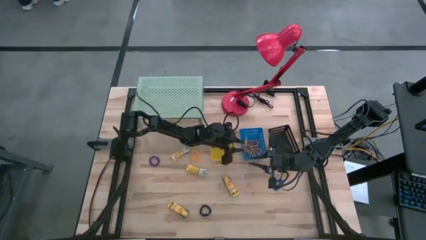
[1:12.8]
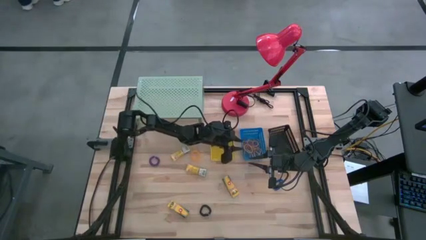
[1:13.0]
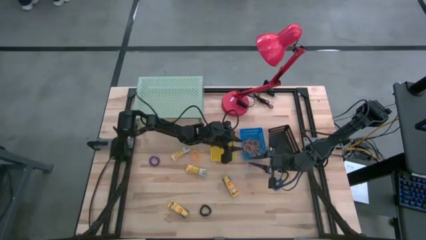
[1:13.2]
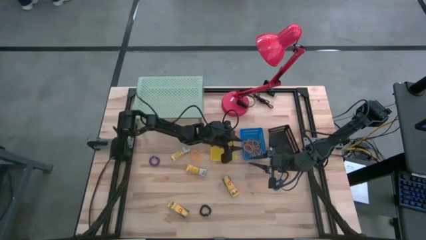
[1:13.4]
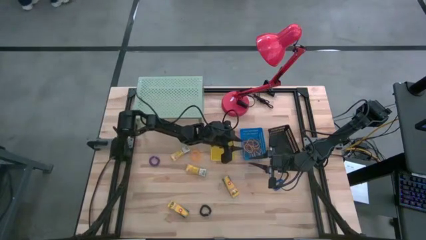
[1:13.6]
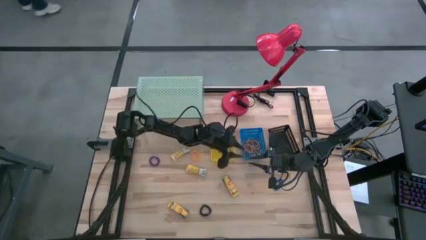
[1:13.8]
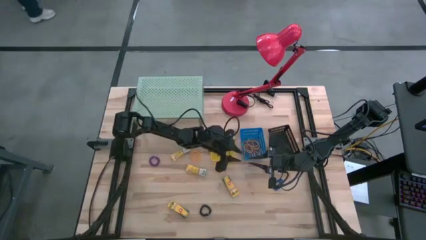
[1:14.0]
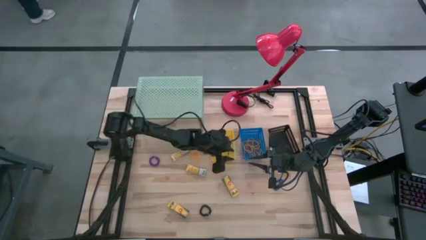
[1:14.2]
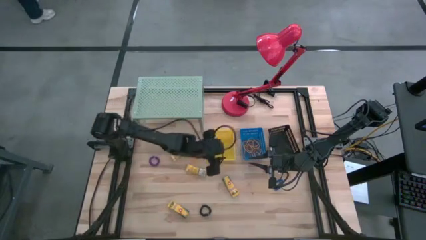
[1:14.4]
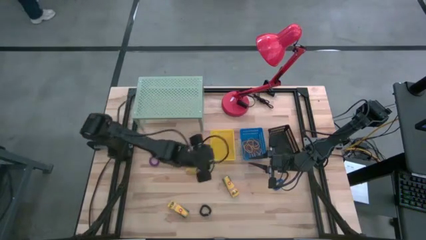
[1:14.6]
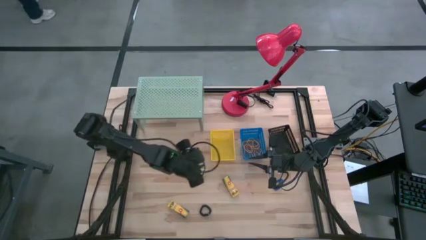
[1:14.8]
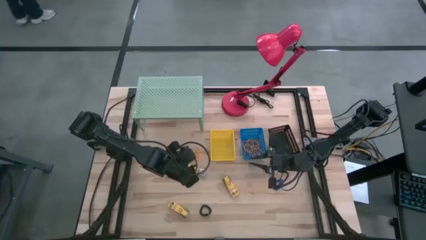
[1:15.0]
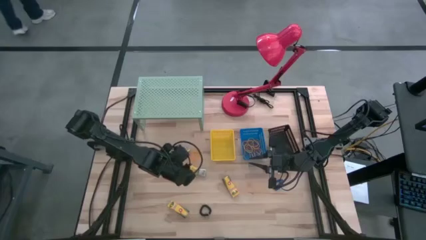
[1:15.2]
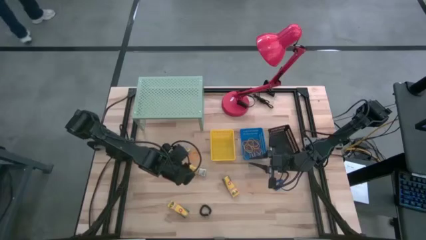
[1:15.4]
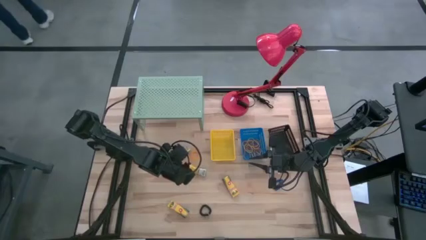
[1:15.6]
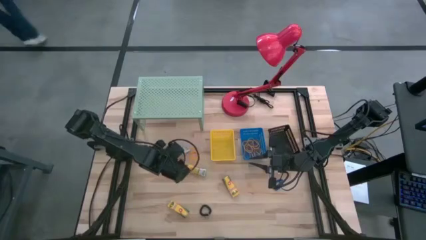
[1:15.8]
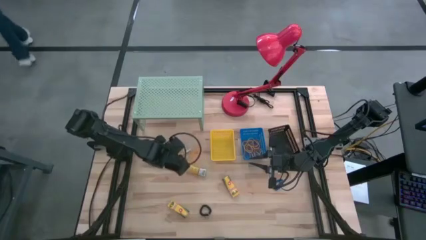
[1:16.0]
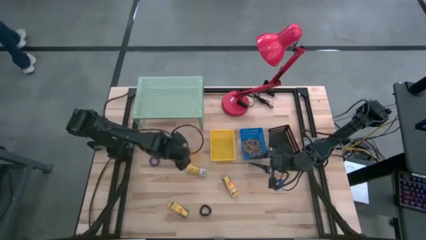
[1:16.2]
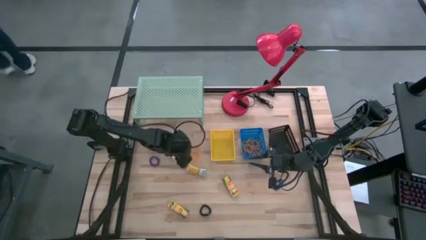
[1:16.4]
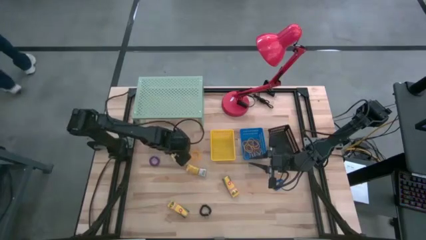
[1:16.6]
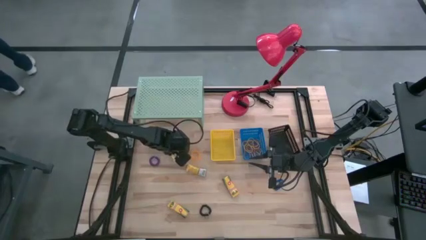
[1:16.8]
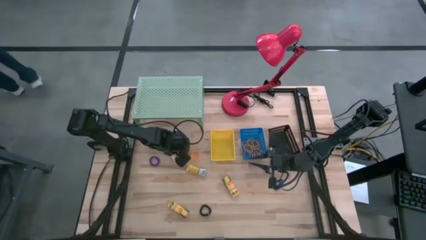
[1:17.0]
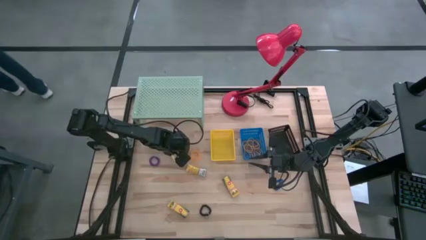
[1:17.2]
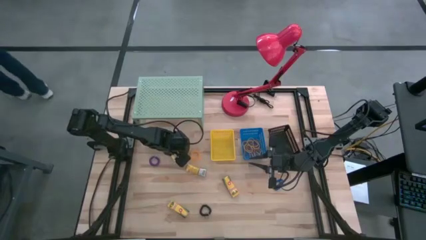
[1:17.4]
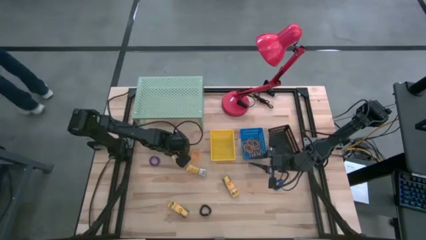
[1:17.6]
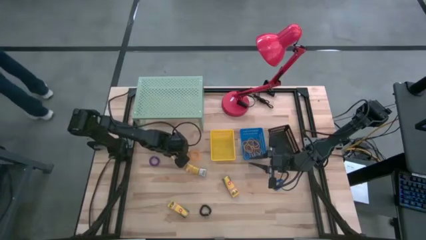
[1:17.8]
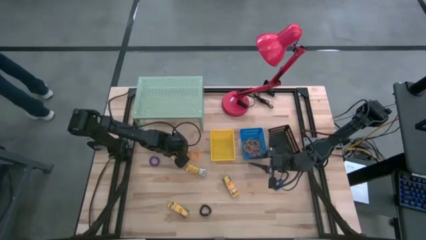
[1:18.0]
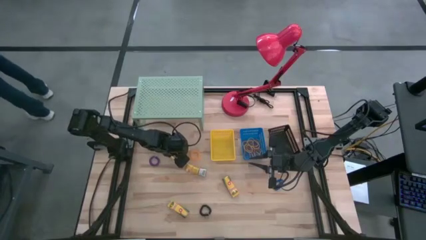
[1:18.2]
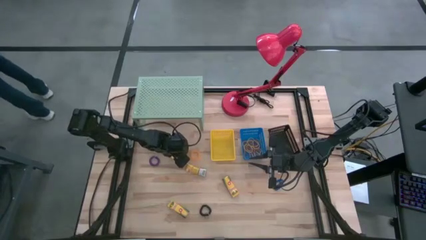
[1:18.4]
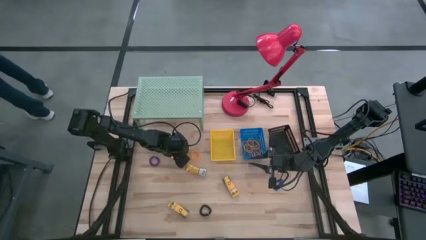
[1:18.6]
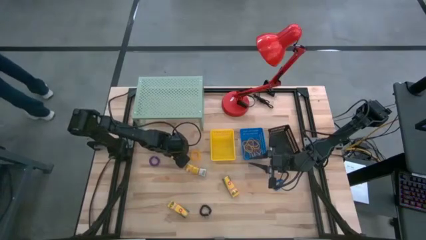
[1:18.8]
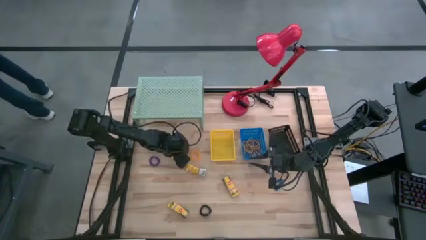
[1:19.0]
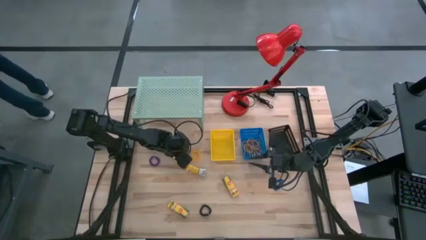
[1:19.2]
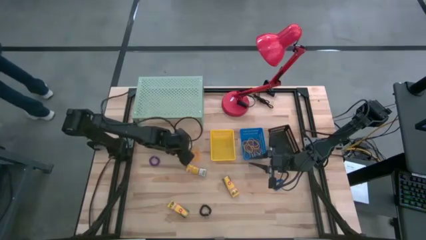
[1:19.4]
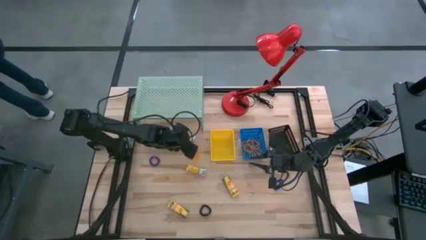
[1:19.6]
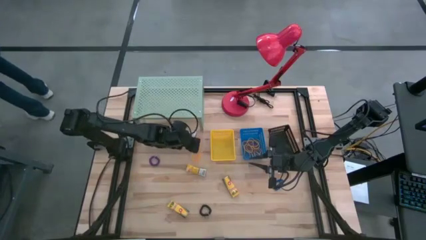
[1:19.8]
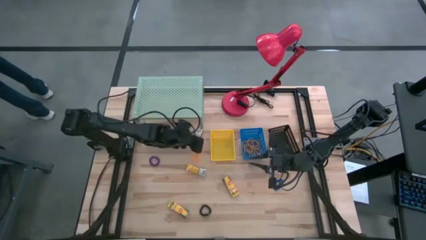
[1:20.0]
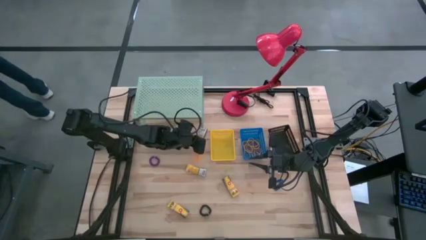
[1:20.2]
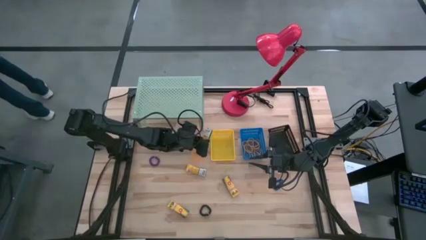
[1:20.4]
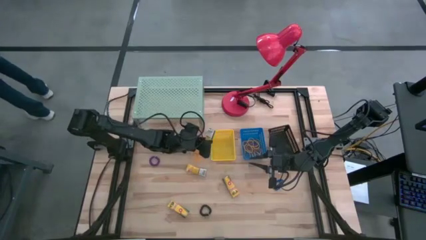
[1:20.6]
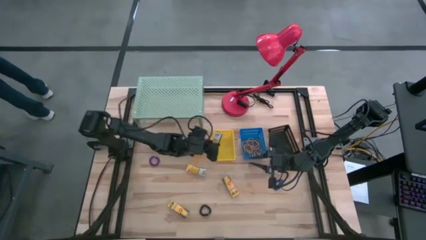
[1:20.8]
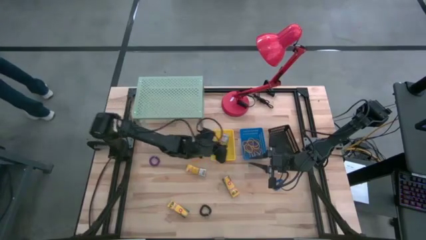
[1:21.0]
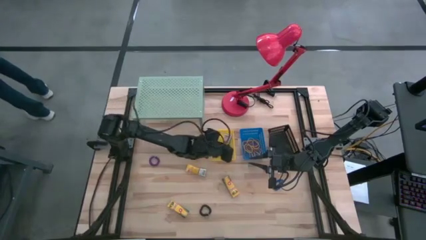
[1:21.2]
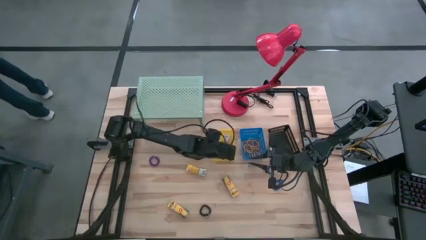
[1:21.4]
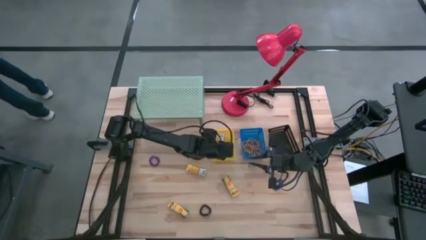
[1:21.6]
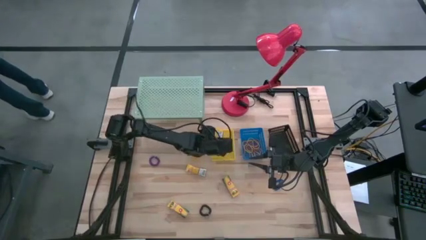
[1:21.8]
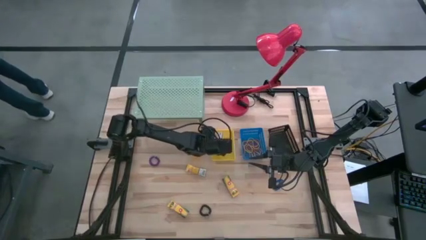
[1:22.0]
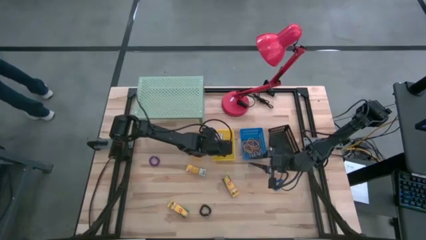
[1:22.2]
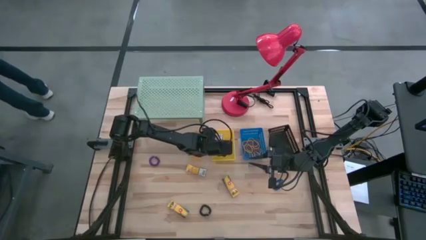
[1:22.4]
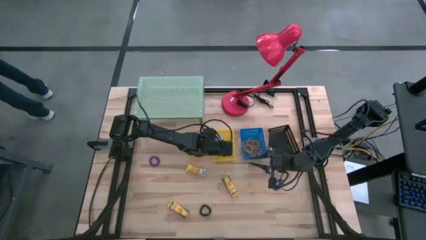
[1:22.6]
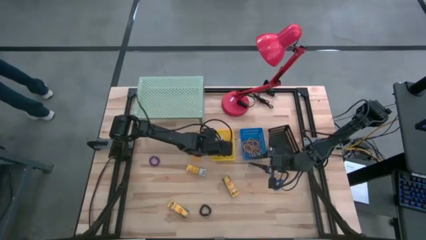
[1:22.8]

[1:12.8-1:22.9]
Task: Pick & Place Office Desk Supplies
Put the top left crayon box into the yellow basket

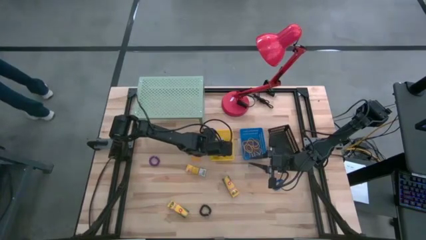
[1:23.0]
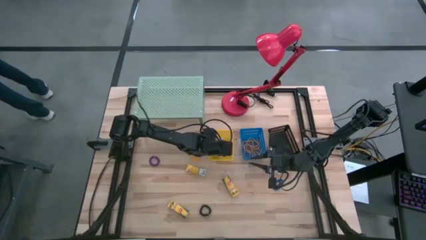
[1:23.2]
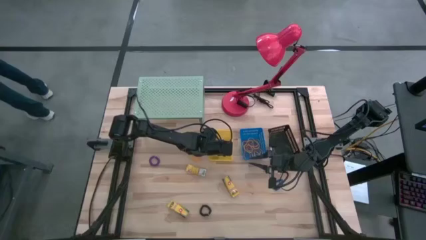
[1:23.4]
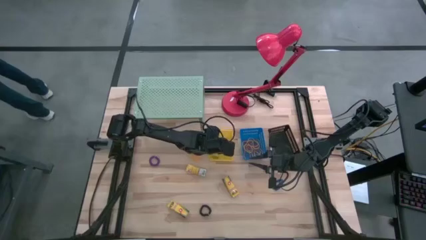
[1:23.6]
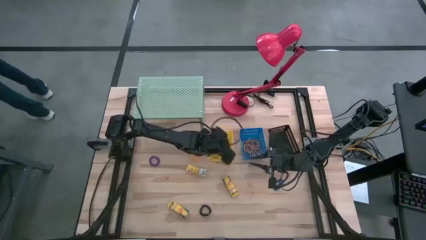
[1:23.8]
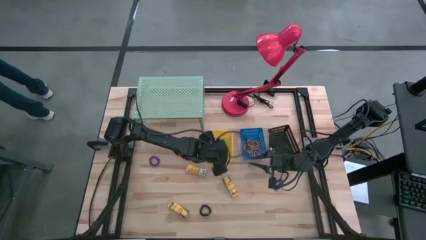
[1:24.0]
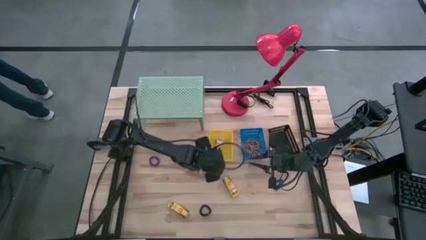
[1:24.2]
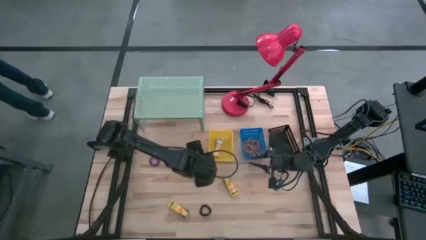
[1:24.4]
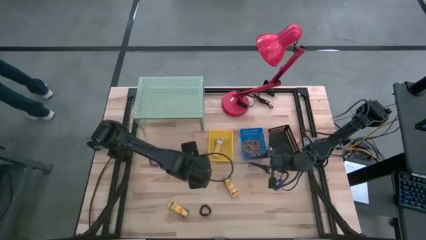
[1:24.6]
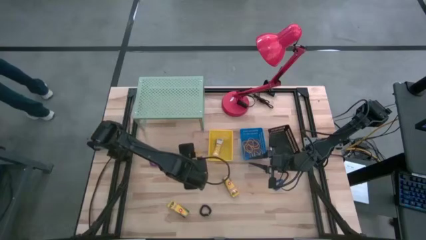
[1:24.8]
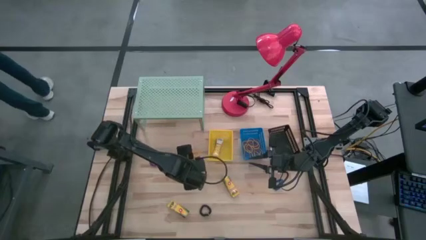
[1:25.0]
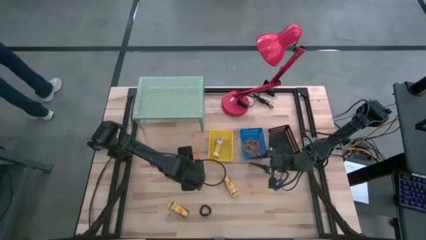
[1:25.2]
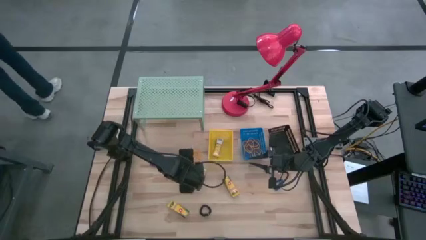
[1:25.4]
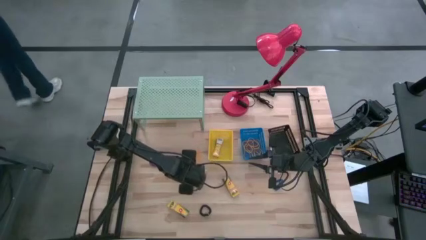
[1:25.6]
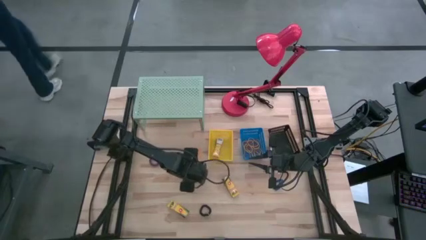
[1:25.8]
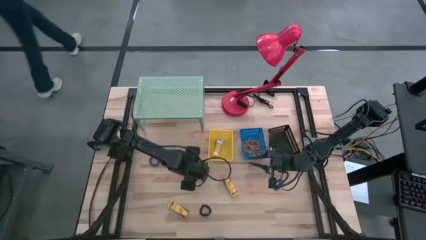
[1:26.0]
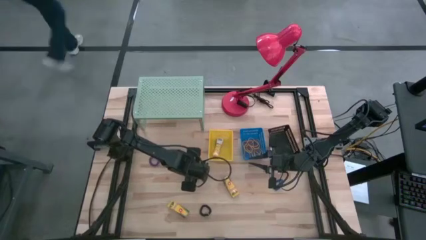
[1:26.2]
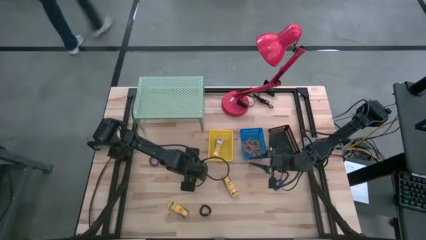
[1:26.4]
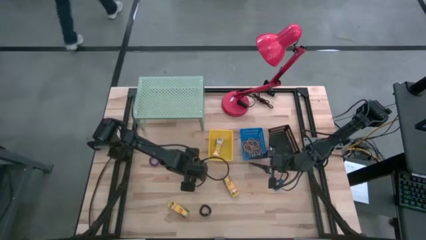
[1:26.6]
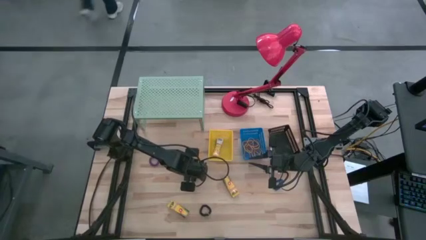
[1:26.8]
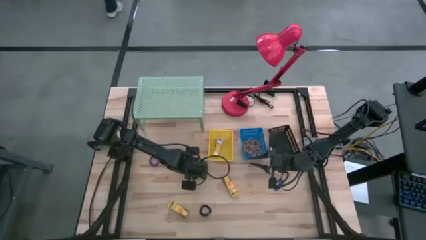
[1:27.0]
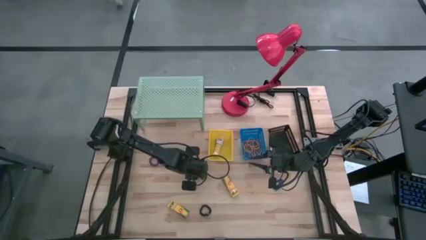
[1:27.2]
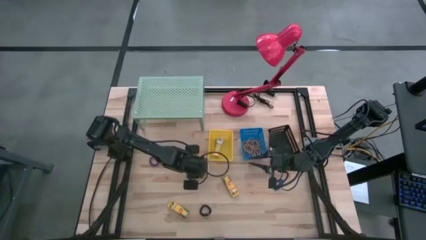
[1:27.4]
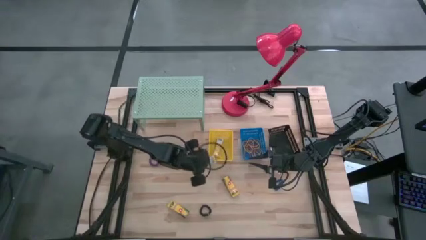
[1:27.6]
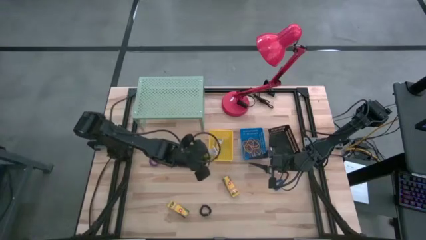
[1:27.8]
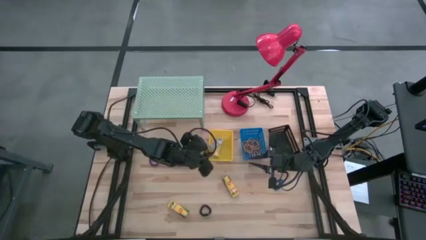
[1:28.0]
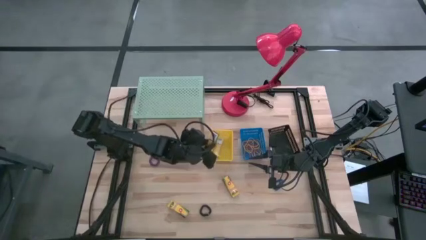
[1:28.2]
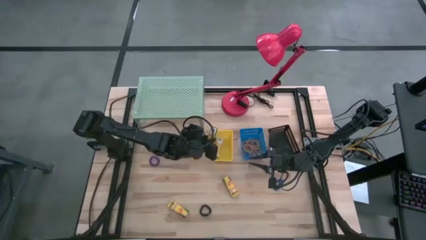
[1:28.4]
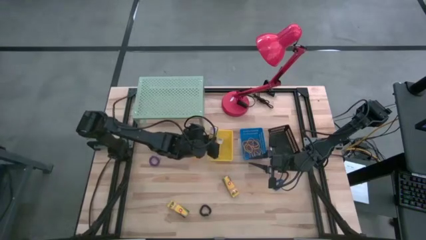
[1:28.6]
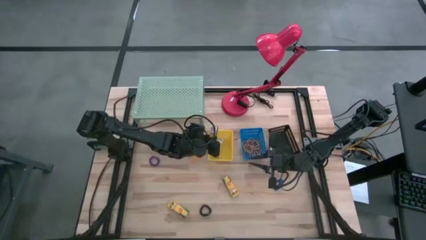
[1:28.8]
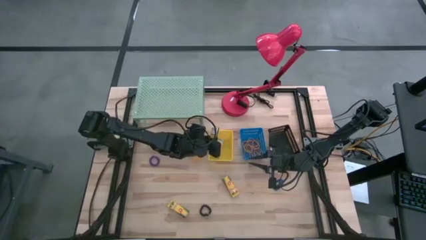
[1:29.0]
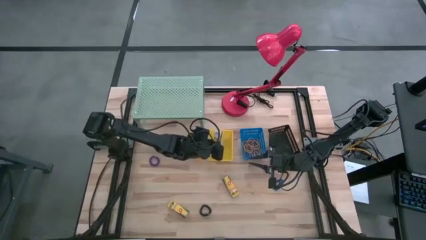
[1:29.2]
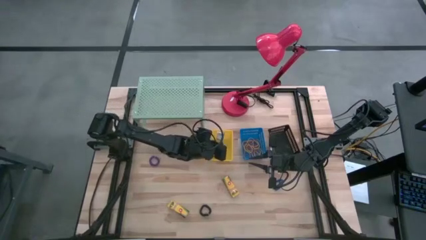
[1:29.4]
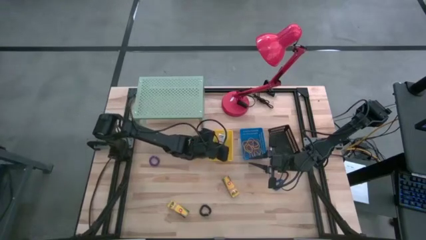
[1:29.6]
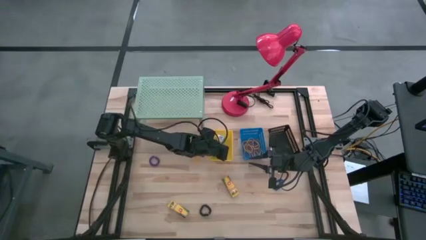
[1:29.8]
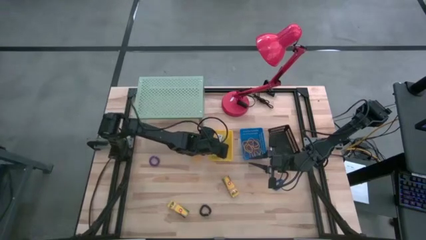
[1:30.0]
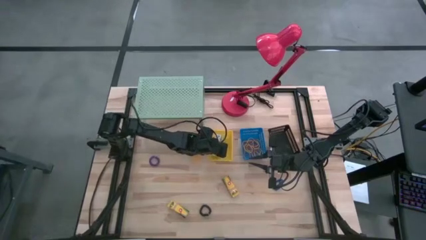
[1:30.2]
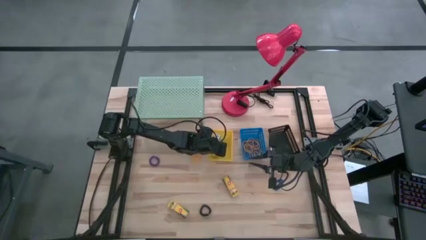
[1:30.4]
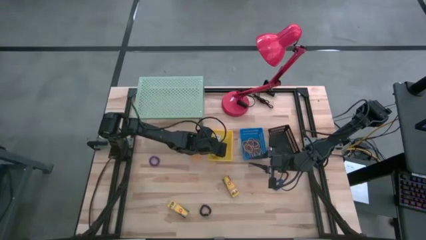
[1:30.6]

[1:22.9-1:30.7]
Put the top crayon box into the yellow basket
